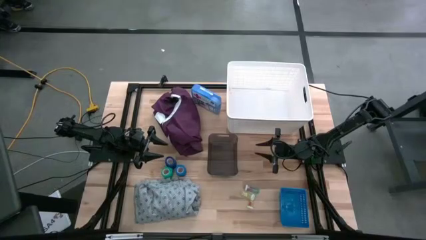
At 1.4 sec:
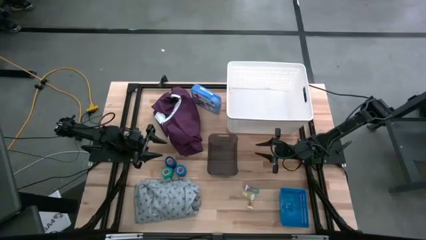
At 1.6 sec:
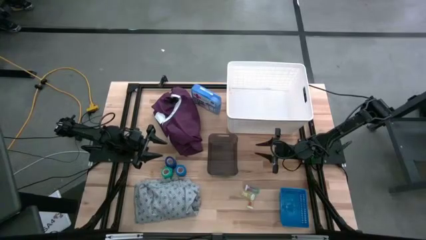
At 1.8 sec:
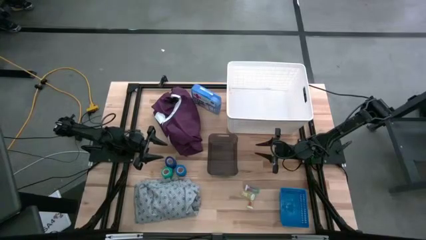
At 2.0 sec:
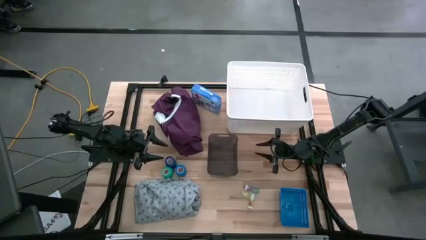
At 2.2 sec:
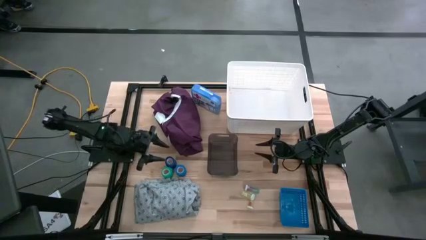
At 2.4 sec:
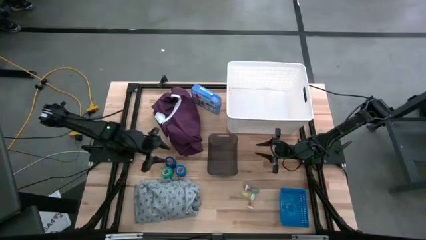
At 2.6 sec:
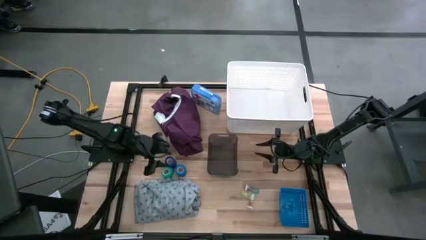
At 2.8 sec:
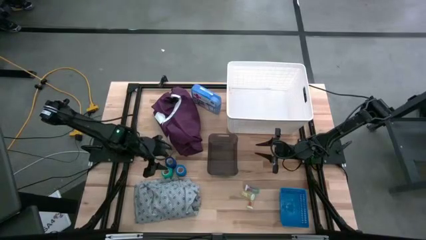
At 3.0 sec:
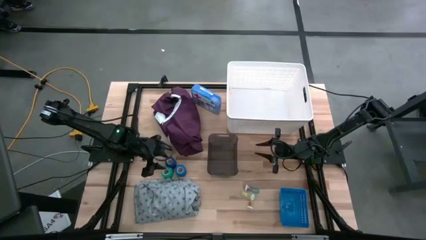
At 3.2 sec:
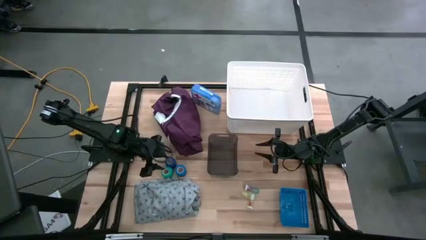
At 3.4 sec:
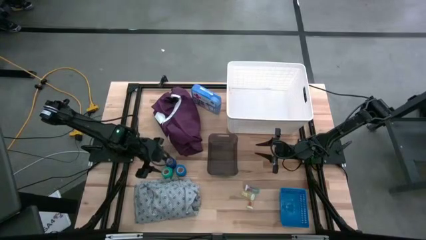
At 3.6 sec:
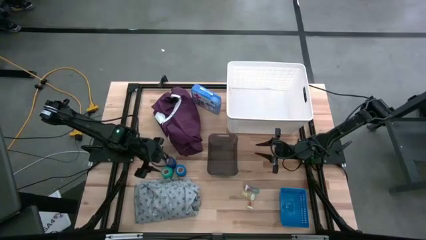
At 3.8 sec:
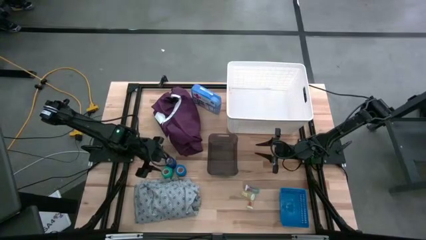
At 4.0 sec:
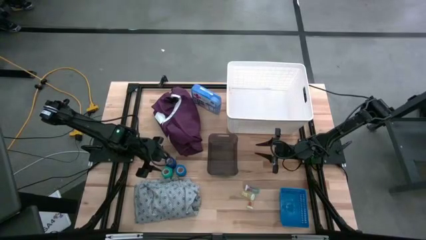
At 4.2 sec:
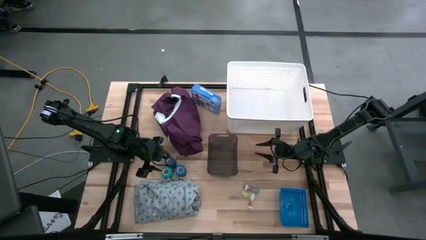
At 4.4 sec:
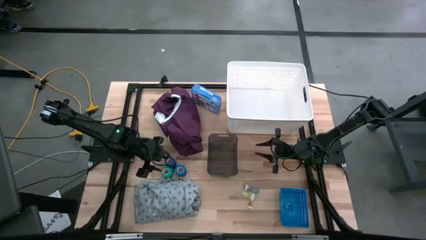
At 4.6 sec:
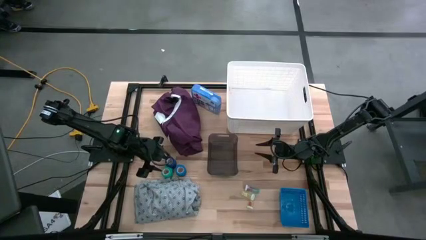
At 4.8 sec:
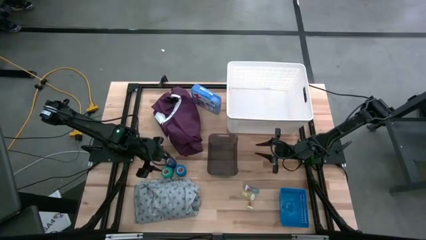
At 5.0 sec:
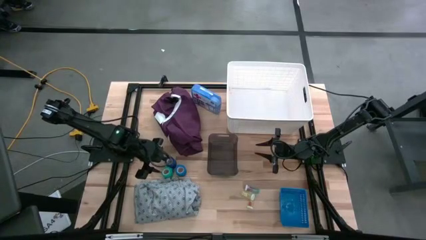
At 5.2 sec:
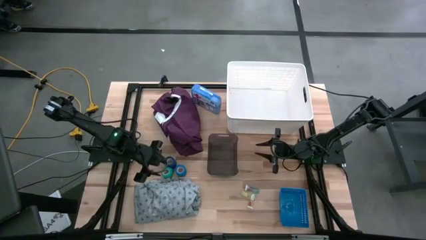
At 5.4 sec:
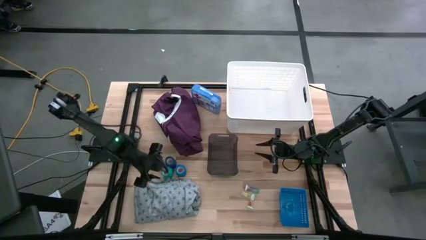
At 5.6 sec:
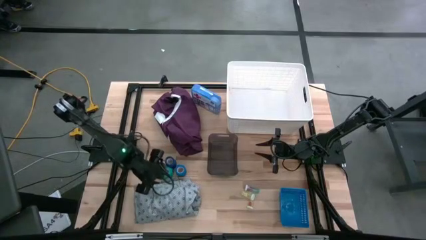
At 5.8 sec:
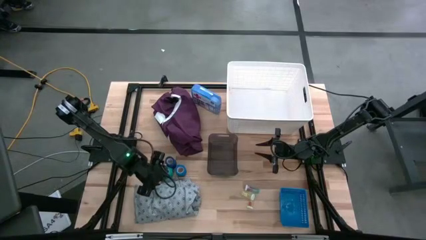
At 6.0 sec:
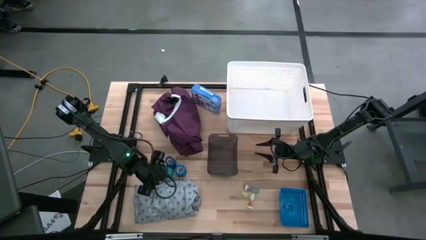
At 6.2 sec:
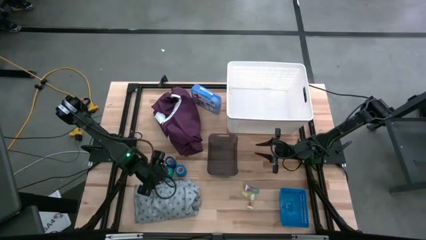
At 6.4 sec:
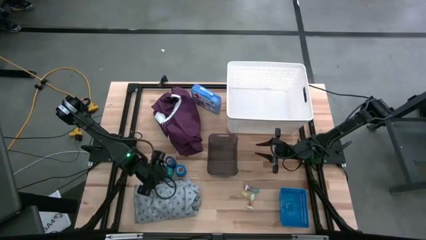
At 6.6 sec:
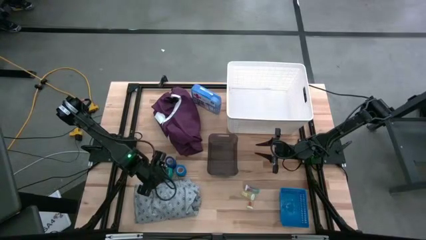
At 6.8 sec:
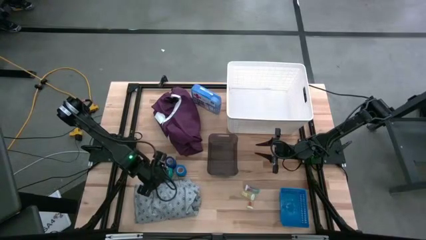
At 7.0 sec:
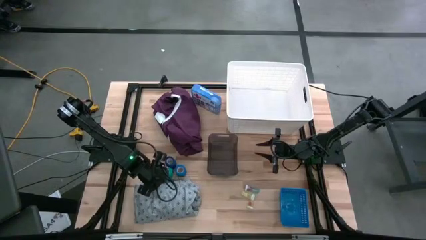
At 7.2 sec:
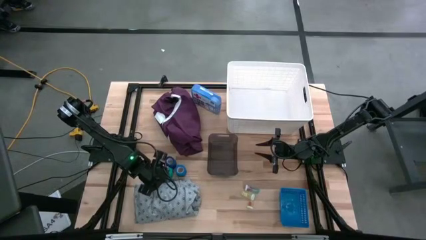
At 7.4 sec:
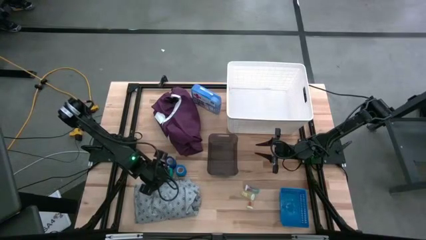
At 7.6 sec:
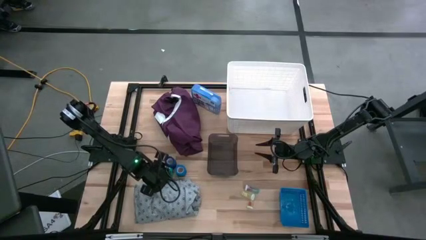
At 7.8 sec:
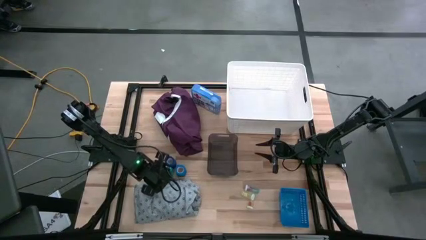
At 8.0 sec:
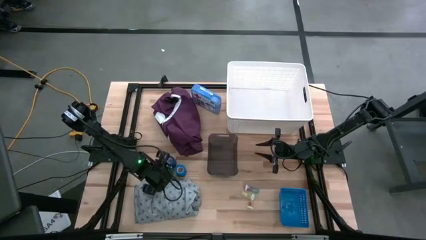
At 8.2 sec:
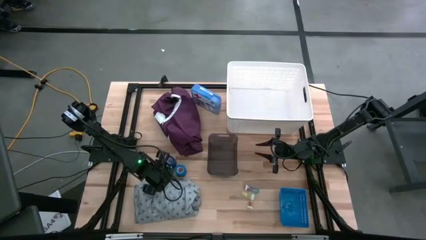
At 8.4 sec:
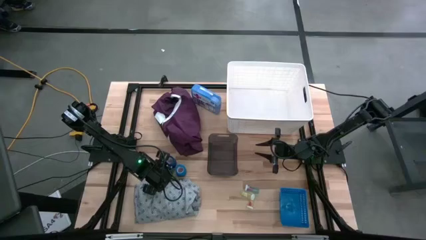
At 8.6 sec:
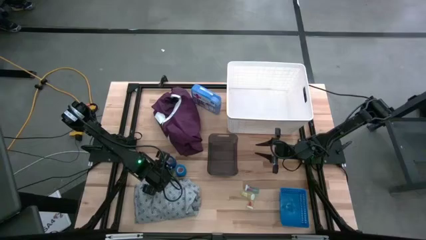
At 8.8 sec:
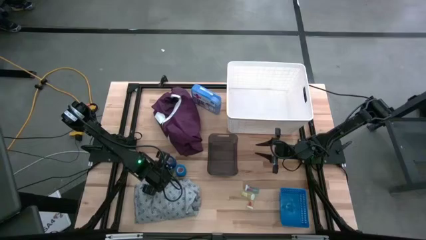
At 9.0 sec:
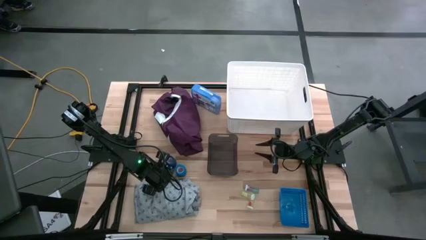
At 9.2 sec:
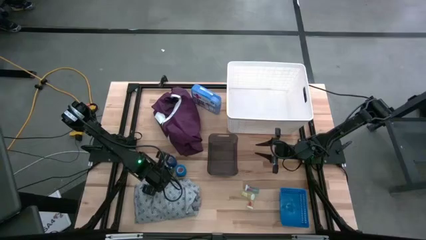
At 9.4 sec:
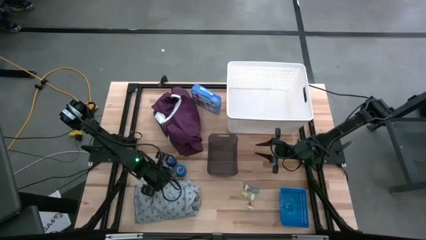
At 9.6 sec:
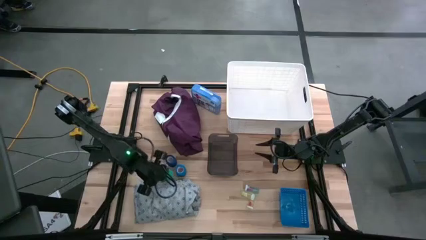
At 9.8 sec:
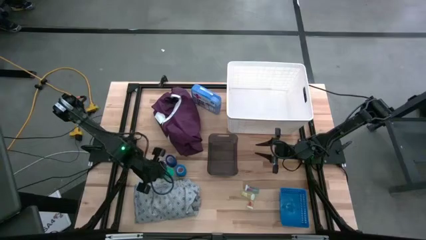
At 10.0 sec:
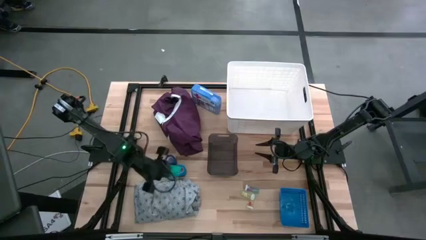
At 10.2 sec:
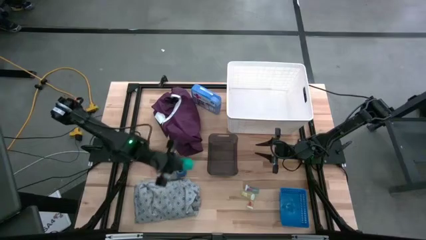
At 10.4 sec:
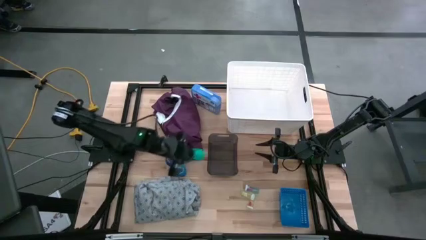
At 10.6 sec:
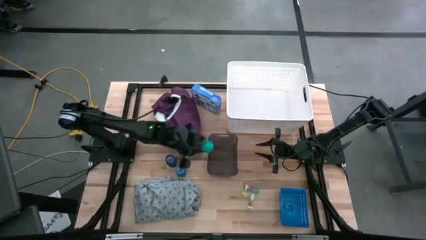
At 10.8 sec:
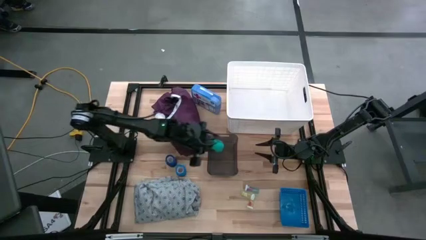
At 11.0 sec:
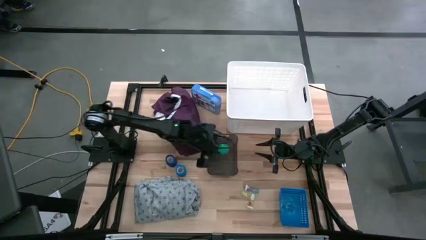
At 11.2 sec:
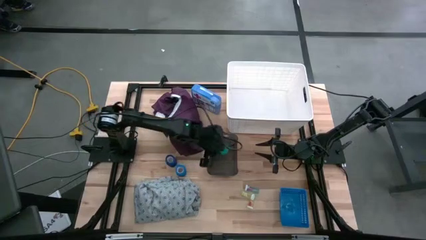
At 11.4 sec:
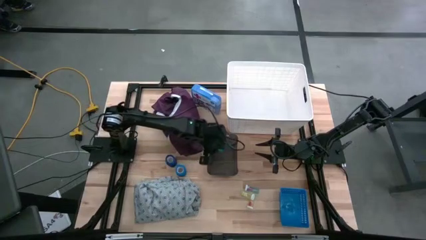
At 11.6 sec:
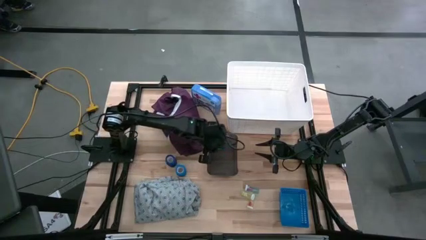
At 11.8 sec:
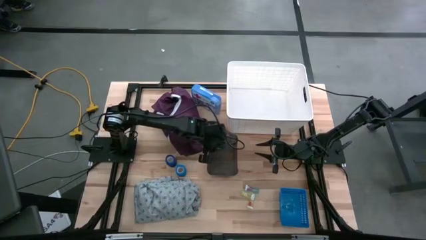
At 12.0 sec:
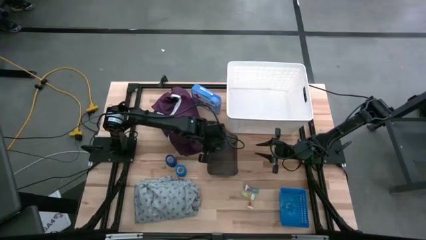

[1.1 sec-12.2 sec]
Task: Pick & Place Medicine items
Put the green rolled bandage into the black bin

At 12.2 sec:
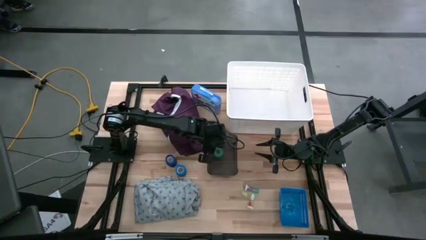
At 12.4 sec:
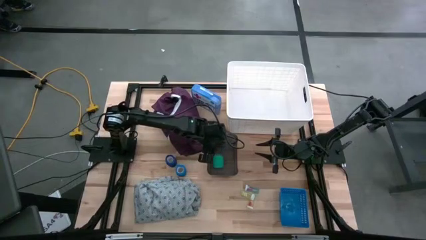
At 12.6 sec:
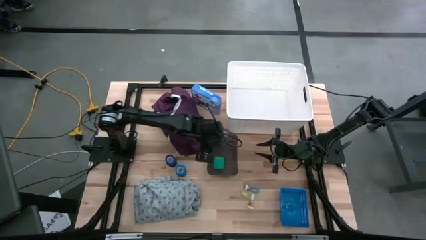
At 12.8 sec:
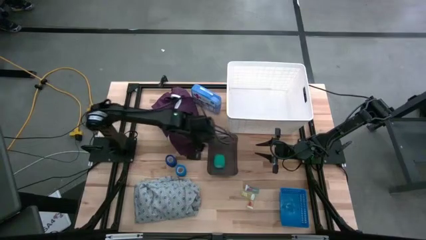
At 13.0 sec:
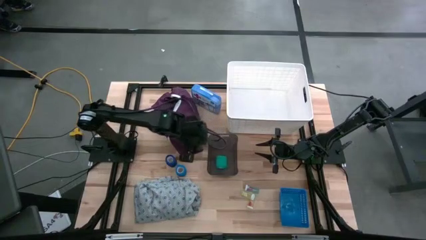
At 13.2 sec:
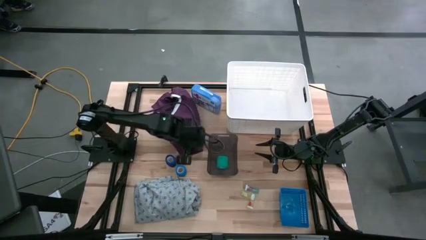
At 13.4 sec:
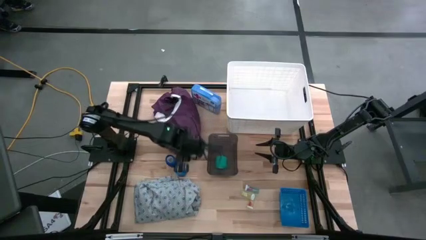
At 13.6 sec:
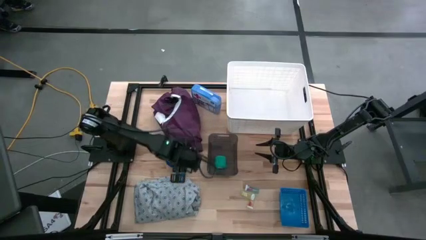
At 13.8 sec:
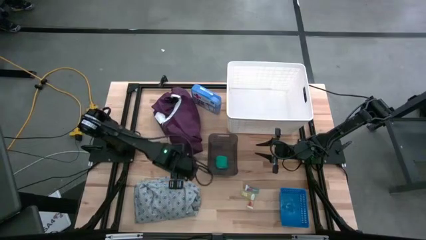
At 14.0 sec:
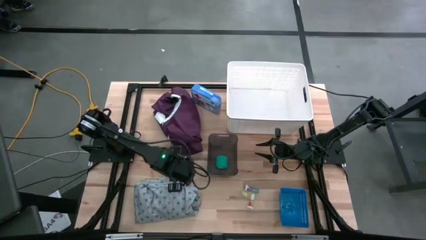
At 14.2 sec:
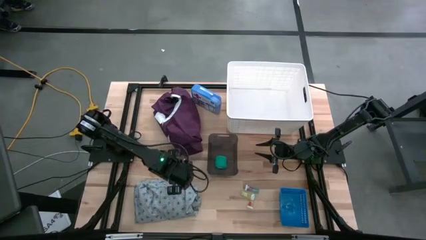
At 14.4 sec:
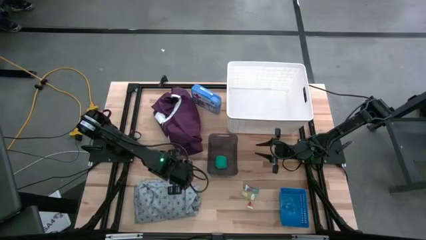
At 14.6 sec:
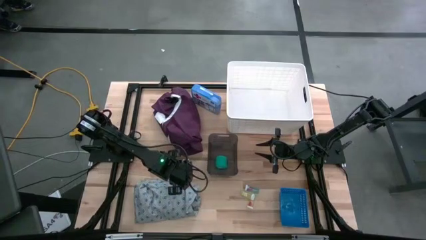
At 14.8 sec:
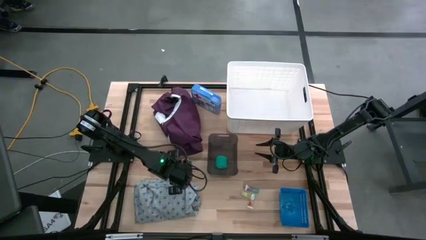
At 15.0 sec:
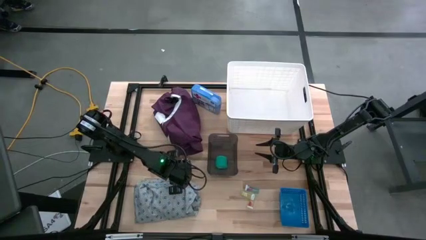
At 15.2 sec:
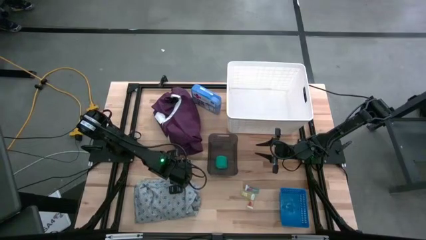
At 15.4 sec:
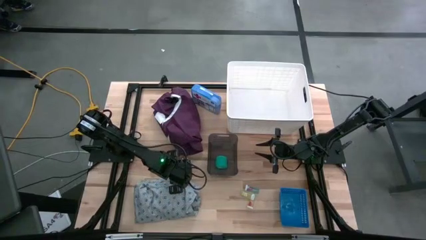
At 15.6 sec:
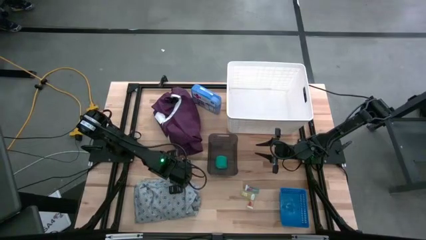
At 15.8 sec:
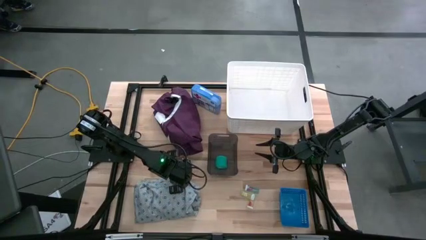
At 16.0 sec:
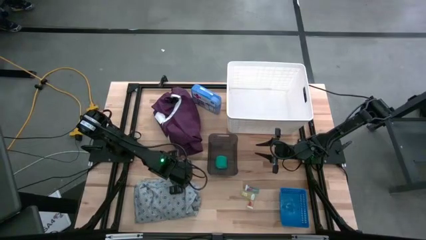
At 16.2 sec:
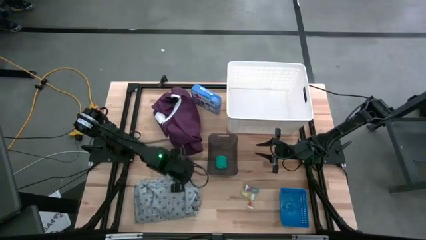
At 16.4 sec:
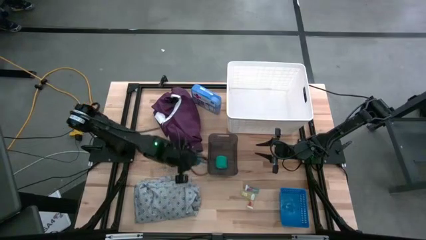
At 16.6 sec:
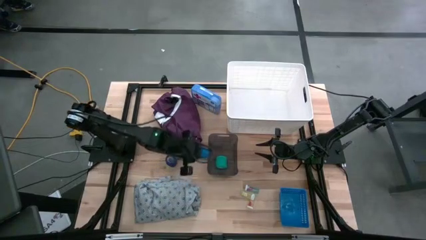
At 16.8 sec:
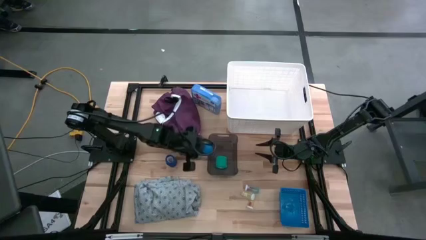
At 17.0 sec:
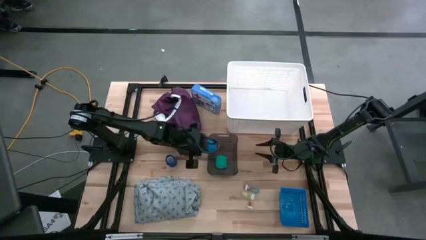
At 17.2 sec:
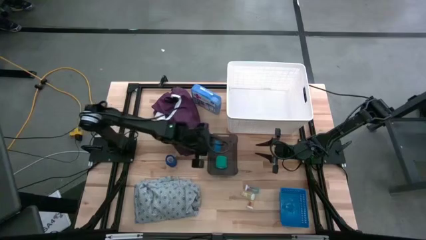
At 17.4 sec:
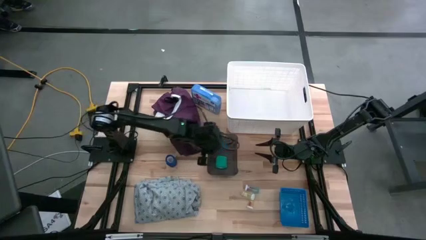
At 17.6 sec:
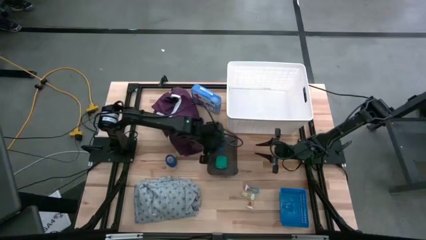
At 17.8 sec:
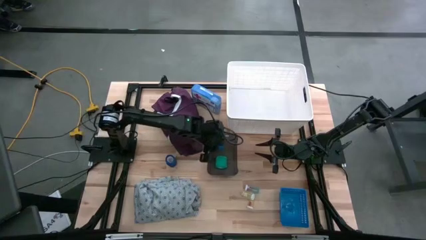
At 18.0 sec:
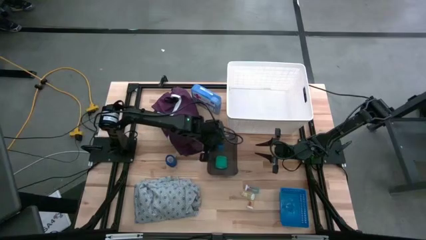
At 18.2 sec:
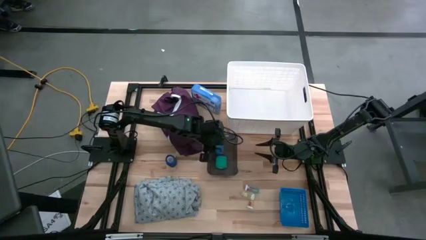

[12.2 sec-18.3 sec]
Put the light blue rolled bandage into the black bin
